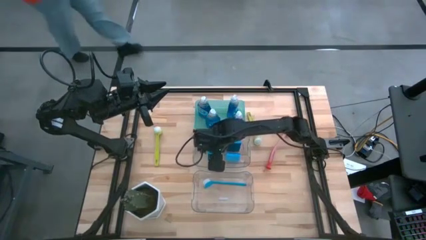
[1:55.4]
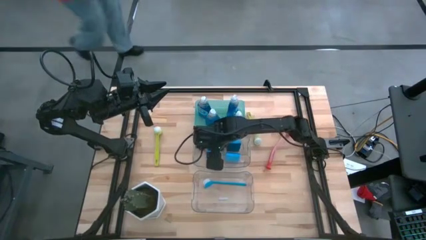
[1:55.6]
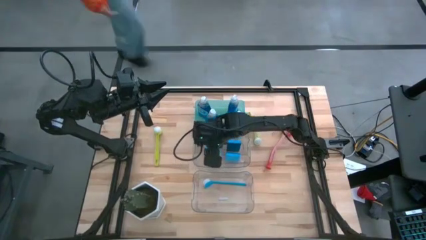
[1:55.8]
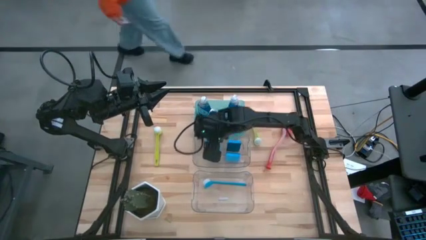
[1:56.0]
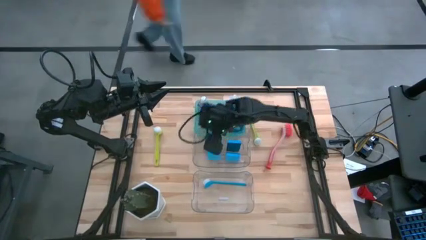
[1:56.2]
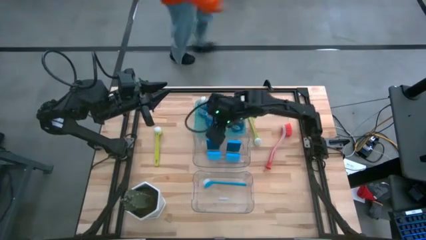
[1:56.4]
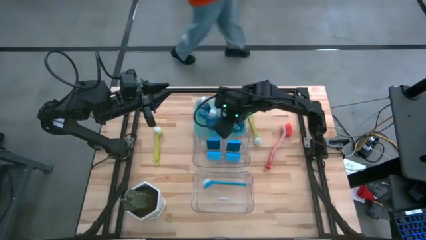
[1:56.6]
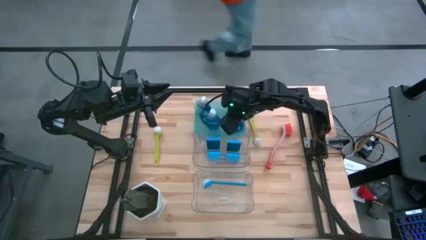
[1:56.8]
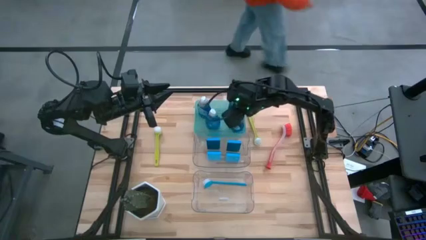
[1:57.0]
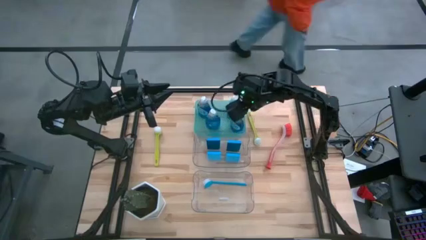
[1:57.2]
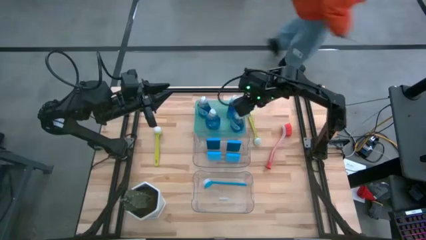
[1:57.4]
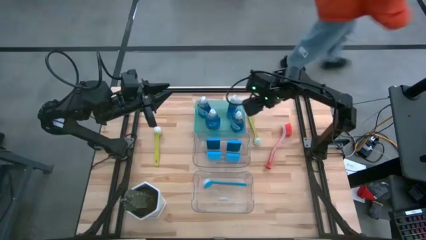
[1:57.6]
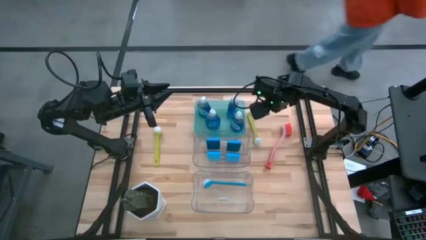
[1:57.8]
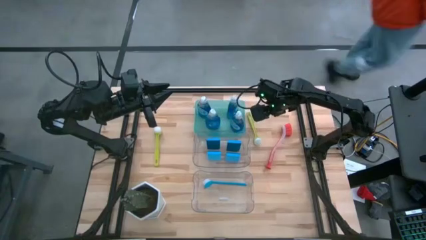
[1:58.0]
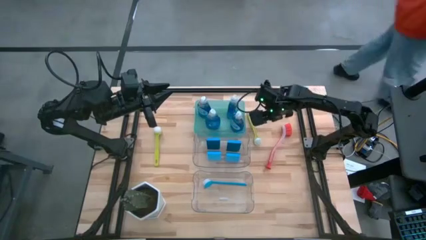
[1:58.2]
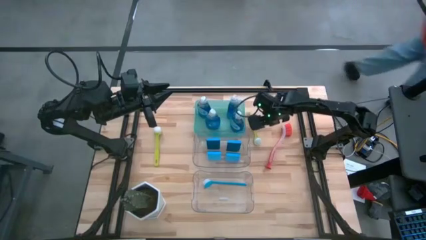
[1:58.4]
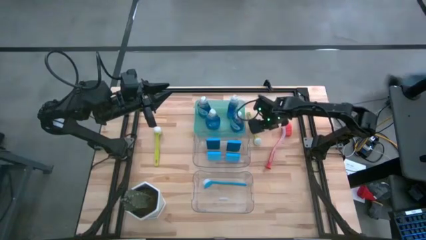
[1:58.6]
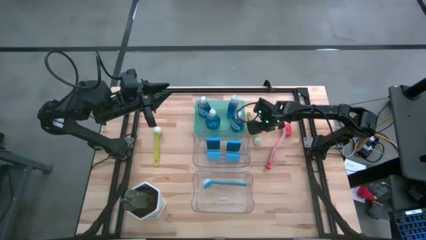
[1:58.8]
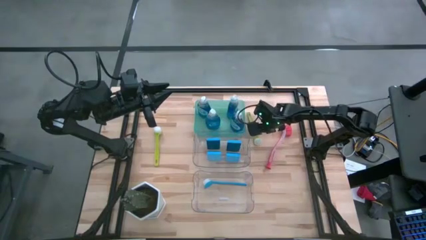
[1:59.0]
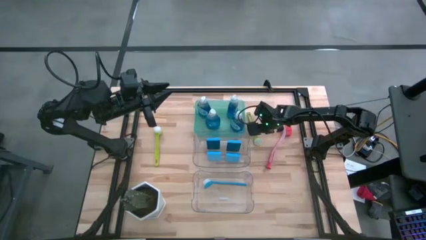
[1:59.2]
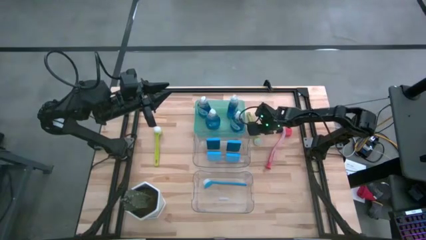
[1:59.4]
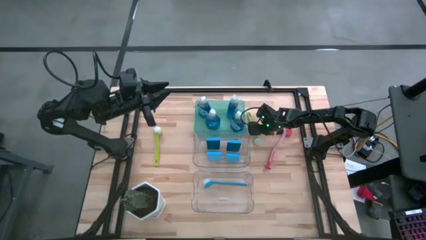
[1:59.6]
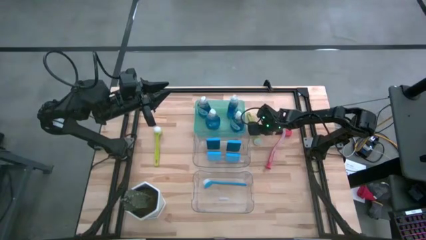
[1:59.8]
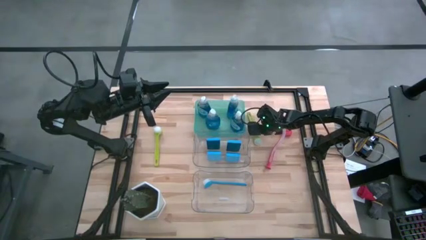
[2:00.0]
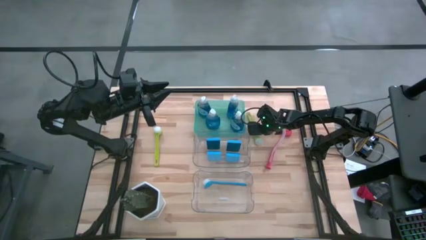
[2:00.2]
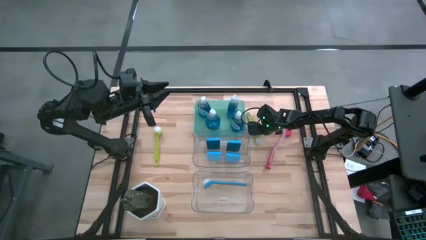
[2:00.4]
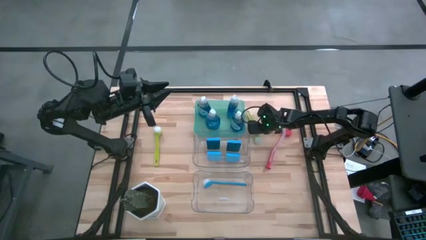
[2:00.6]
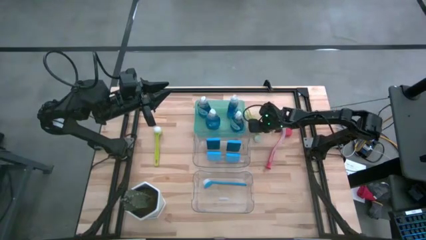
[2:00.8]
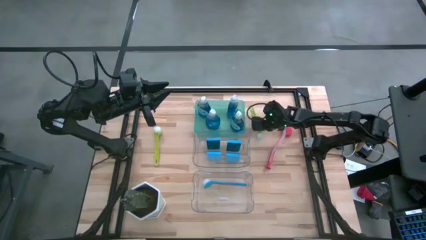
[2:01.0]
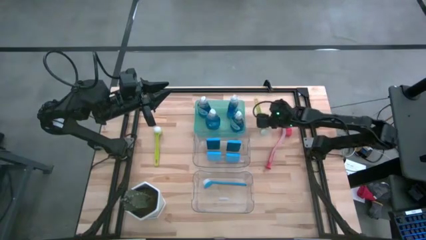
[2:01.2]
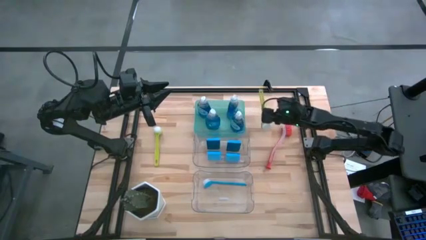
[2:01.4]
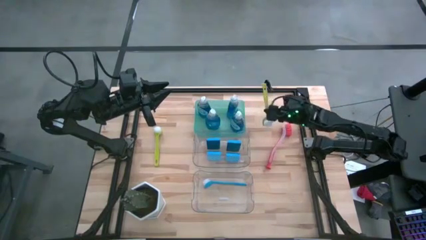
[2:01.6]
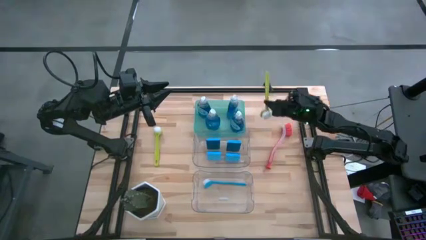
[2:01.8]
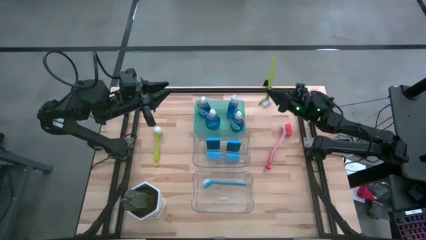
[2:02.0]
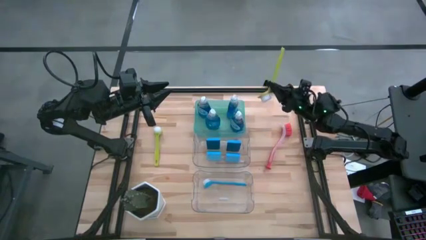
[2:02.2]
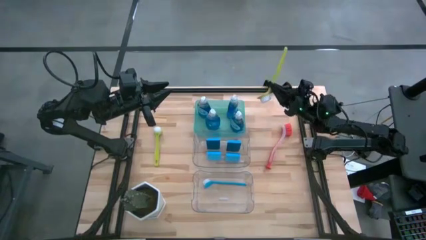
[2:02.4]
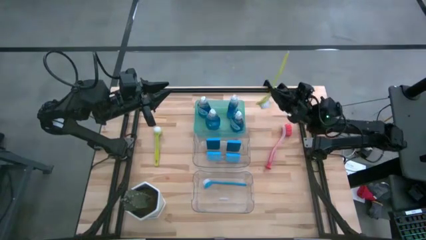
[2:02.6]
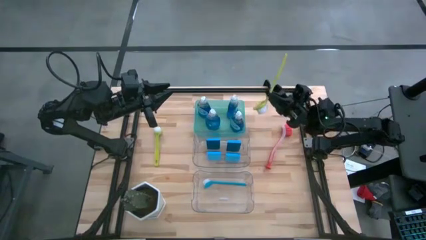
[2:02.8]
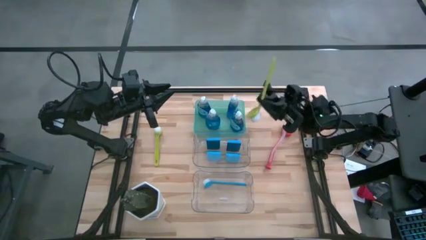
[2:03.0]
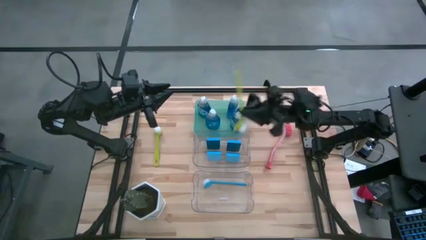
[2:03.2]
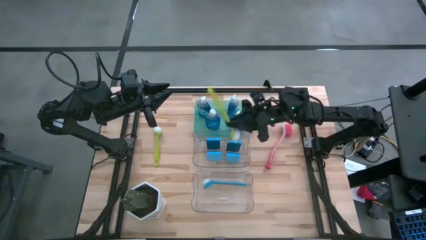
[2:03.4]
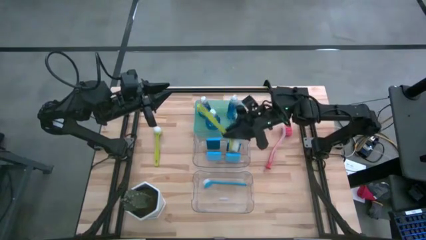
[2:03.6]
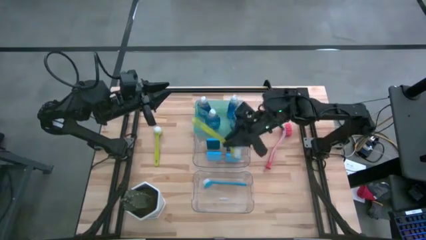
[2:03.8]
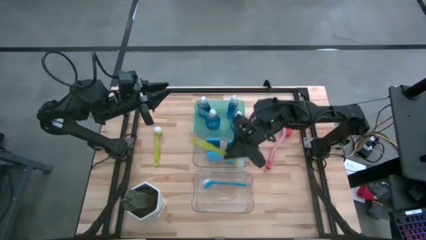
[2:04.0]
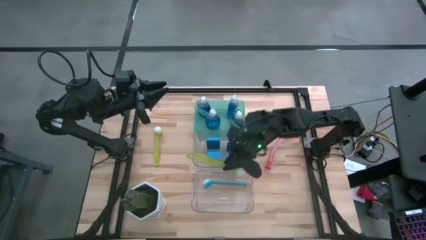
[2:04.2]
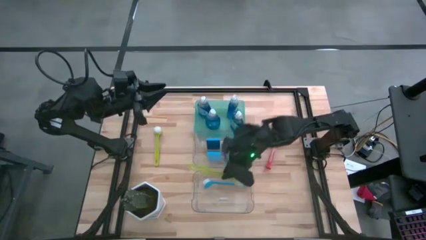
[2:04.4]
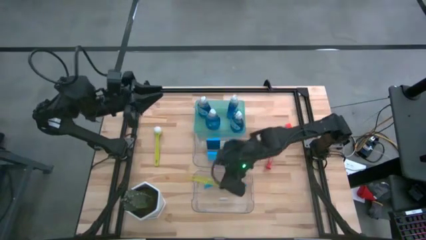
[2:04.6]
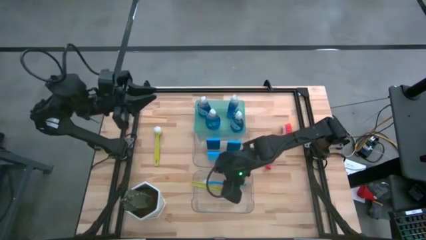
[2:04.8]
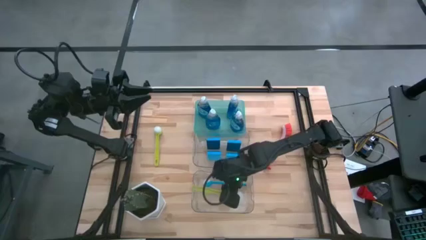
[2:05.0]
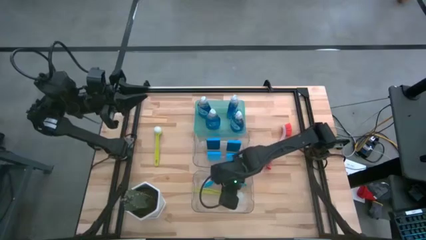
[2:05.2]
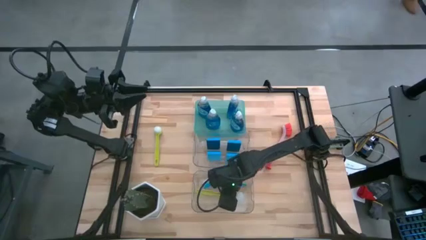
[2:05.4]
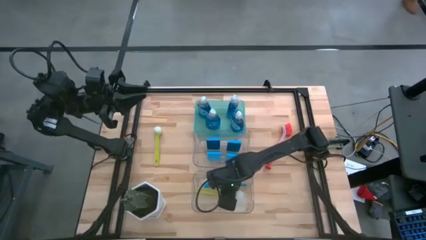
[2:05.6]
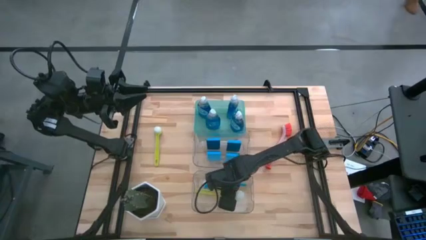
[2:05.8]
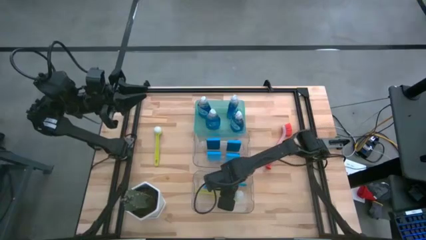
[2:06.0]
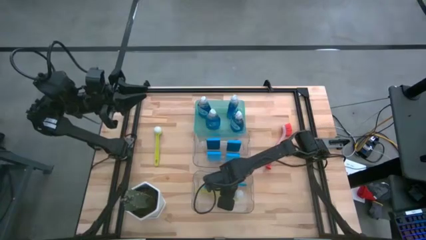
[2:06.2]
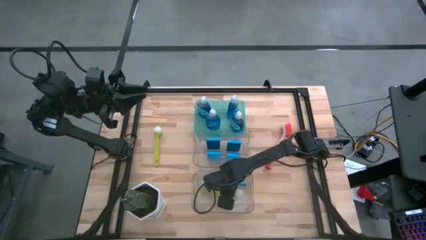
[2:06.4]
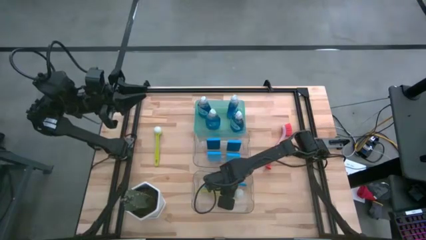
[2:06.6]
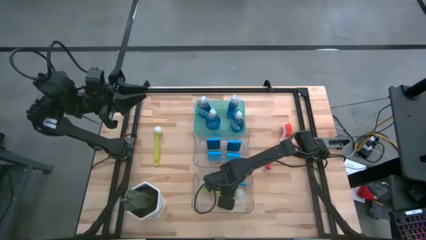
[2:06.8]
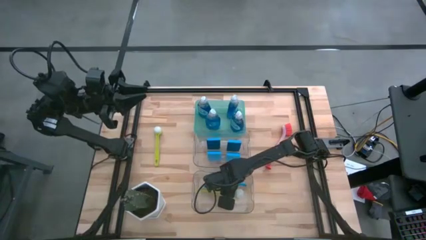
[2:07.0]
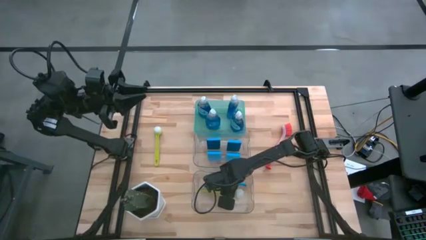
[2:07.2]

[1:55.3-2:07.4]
Task: Pick & Place Kitchen Sink Supplies
Put the light green dish brush into the bottom transparent bin

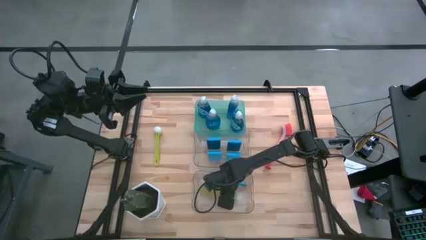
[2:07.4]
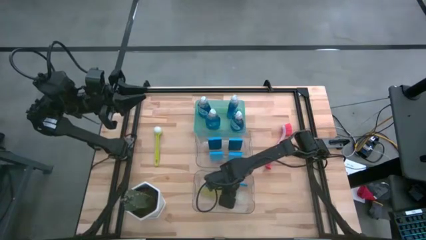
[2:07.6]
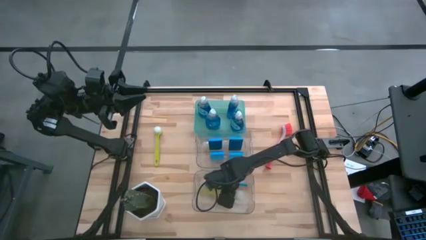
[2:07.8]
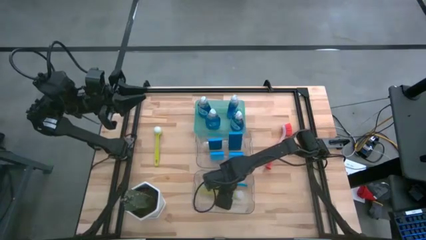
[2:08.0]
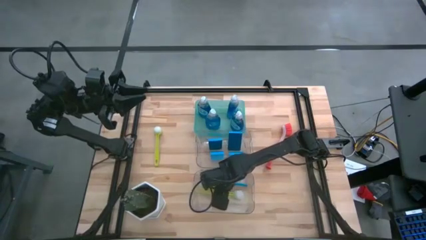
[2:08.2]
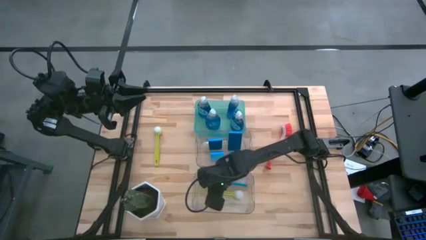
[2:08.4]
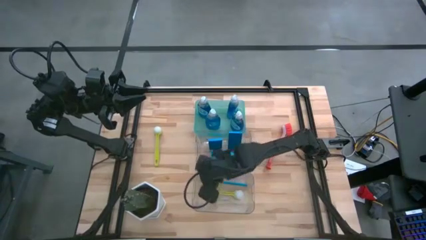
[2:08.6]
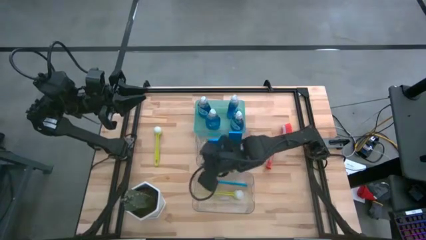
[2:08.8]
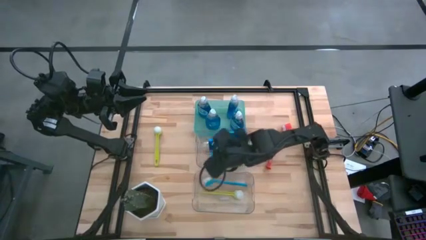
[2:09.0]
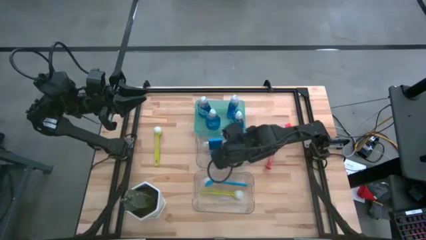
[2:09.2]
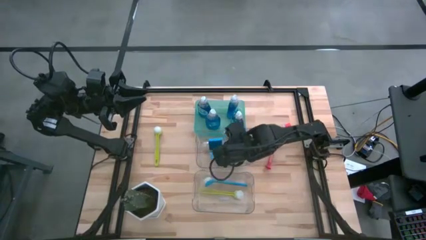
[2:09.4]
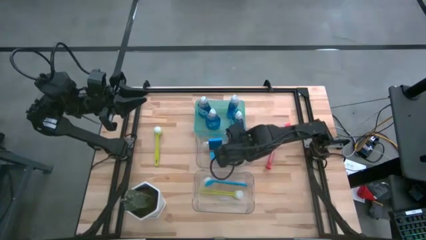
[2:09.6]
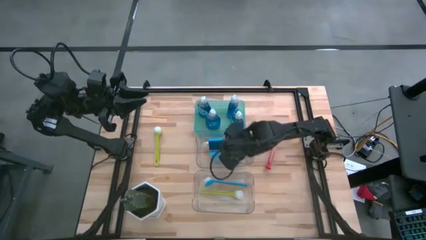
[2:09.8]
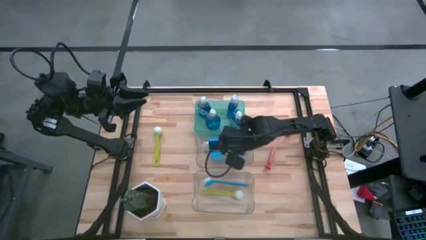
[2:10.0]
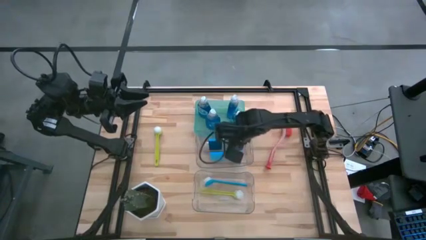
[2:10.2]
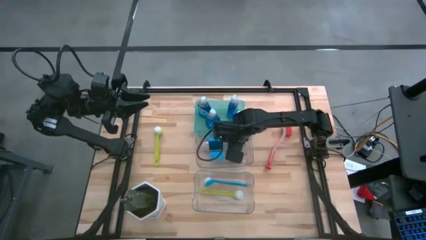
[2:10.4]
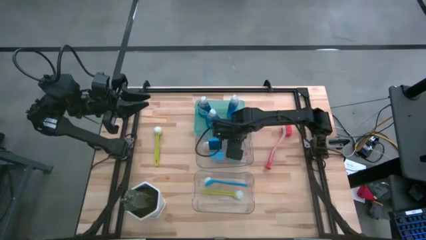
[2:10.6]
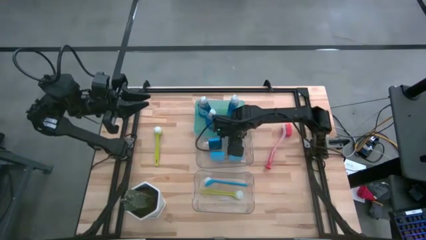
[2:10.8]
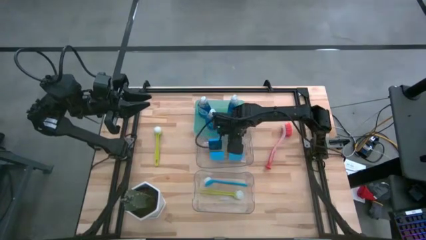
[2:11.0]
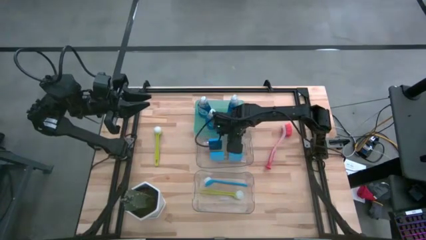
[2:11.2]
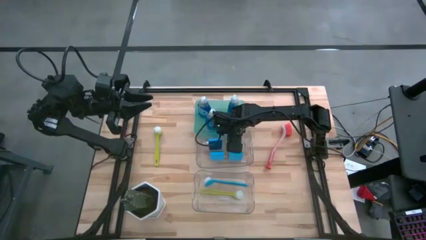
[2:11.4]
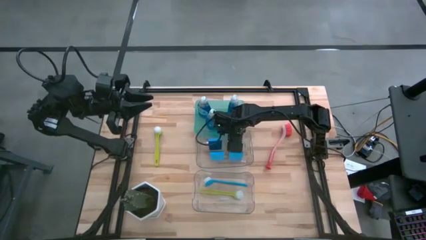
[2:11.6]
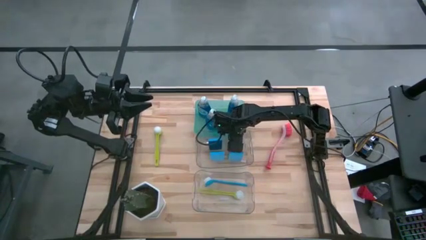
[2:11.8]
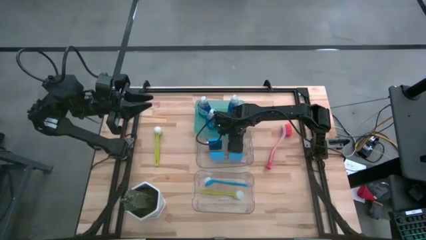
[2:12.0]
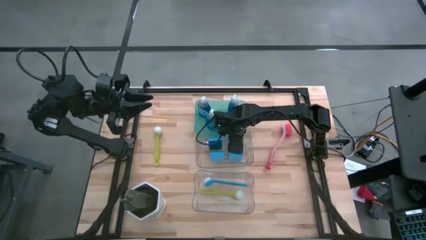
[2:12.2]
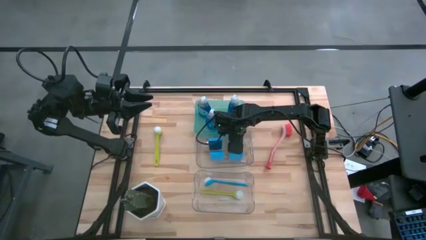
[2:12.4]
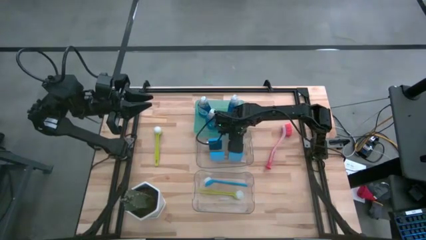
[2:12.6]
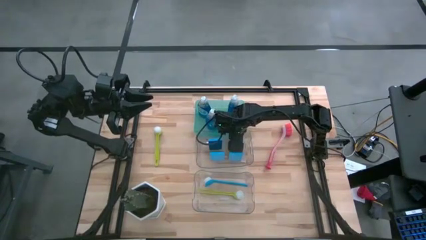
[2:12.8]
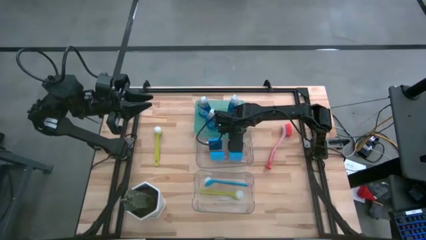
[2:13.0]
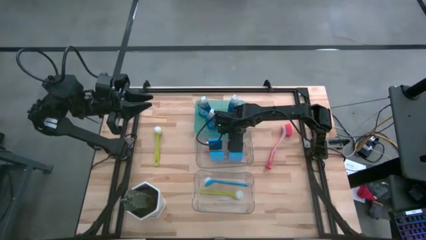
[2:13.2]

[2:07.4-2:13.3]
Adjust the blue sponge
